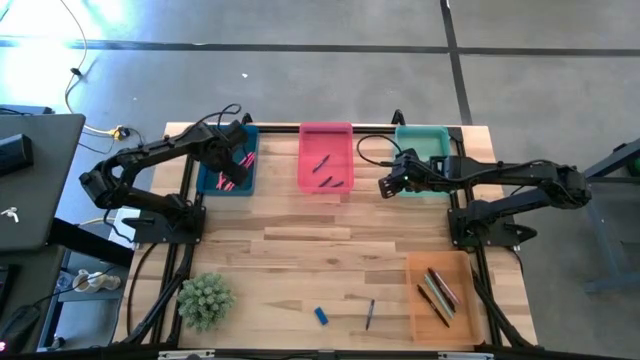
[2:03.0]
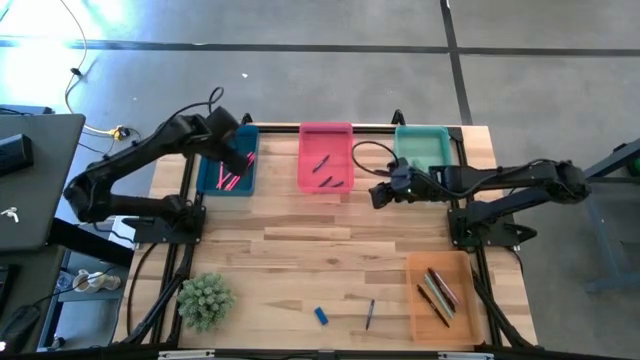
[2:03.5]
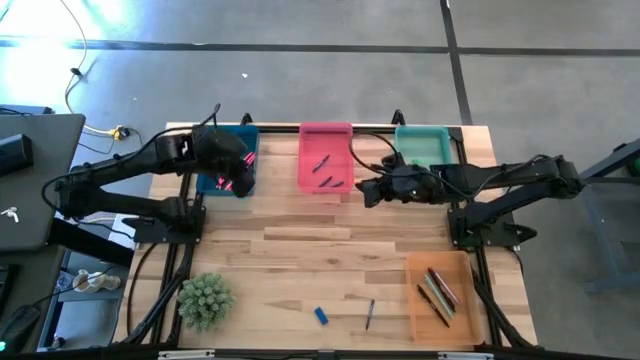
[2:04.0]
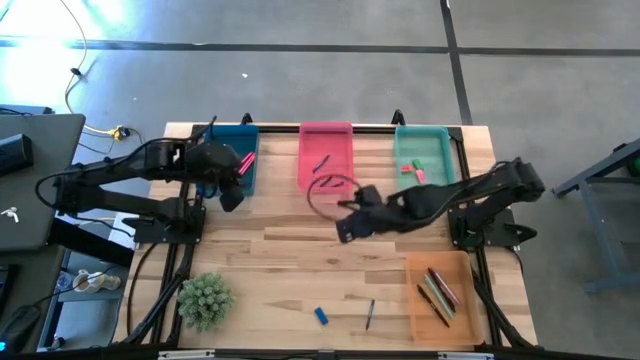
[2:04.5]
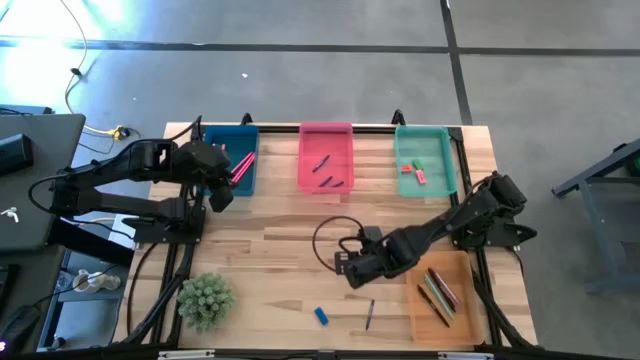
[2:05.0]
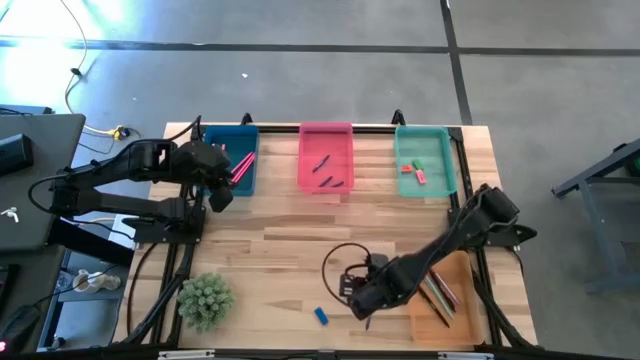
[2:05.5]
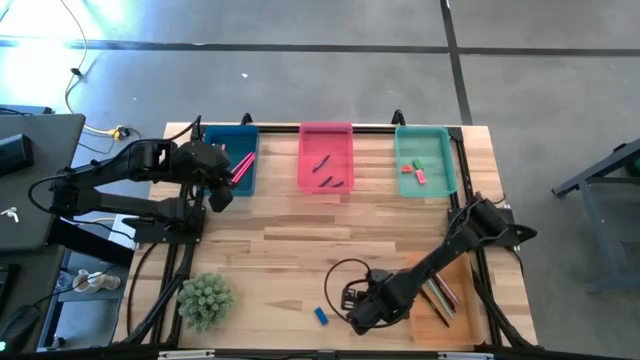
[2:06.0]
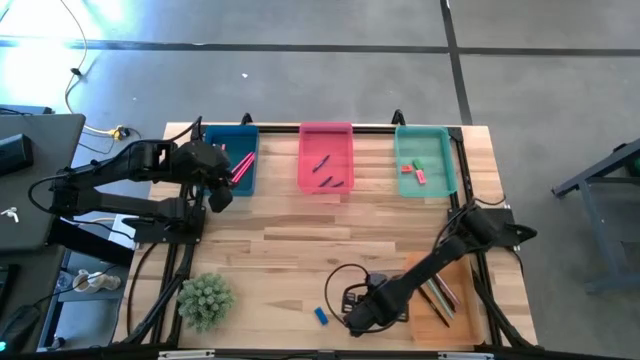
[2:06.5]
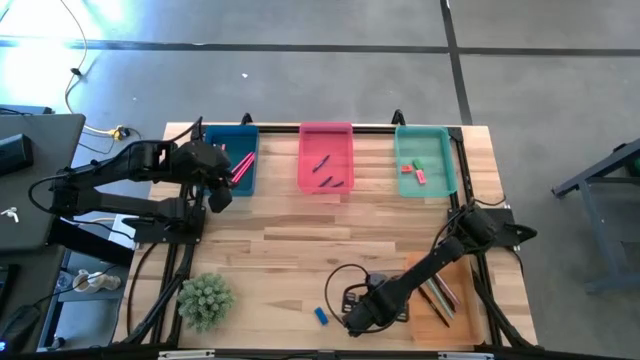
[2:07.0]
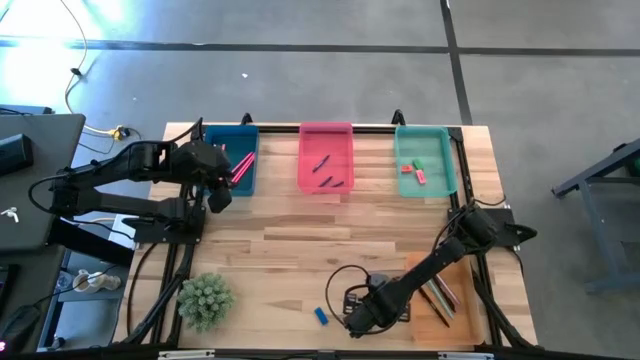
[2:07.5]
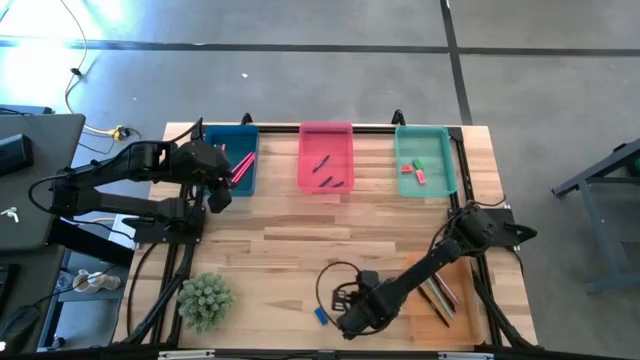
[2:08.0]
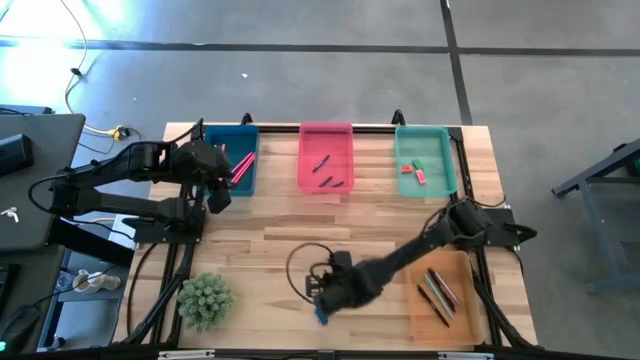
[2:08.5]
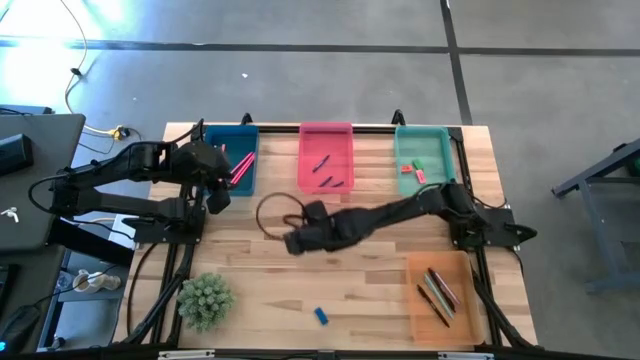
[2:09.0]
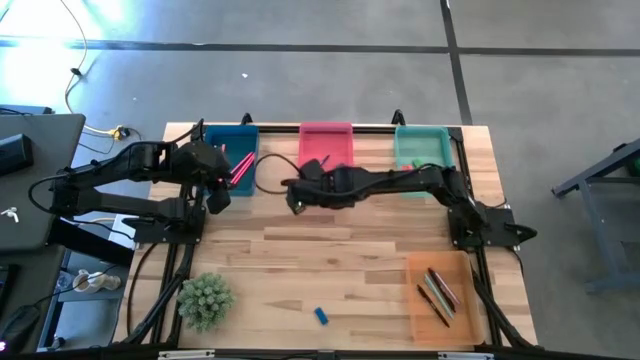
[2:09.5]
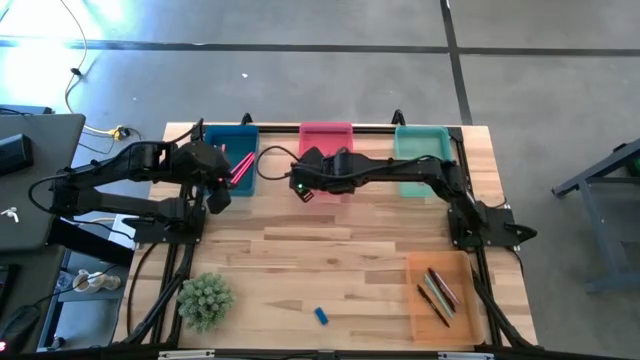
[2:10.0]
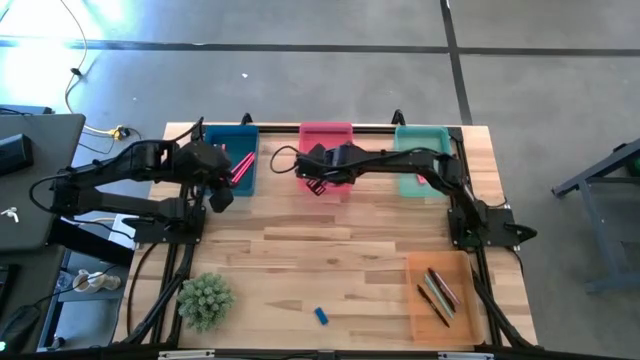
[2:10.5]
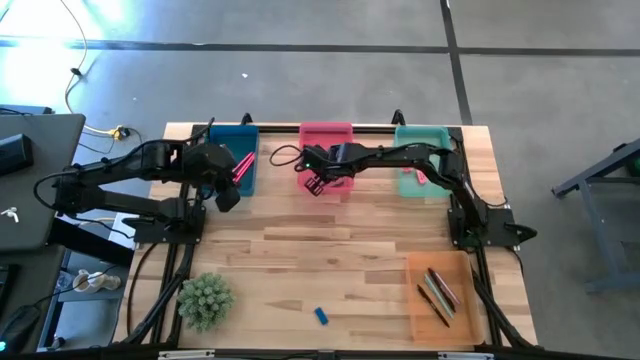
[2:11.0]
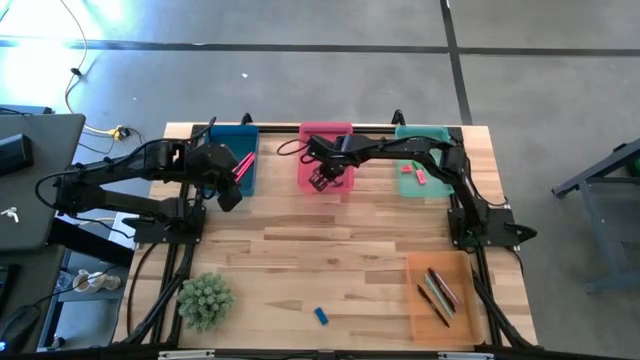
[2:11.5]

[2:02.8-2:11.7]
Task: Sort crayons/erasers/pens/pencils in bins
Put the blue crayon into the red bin

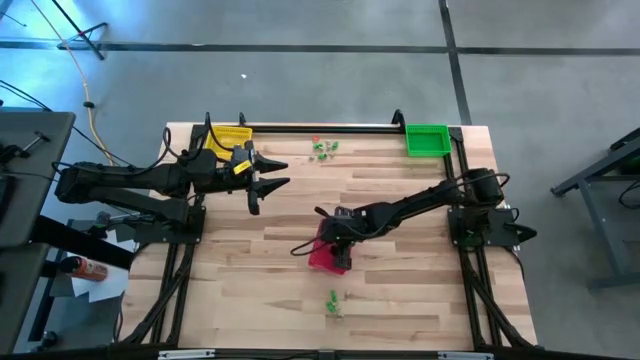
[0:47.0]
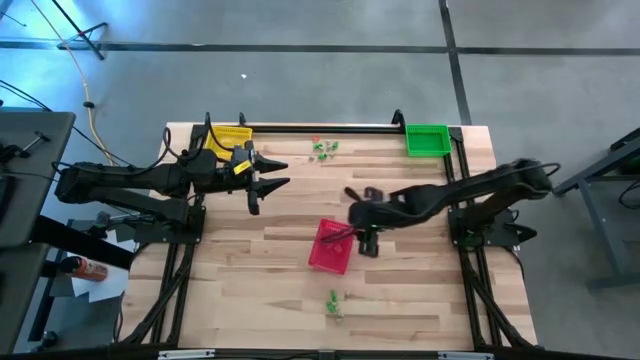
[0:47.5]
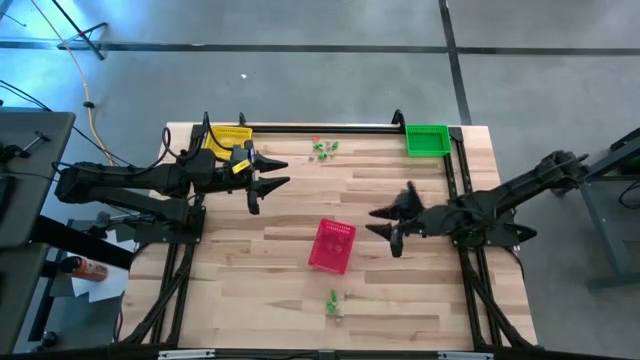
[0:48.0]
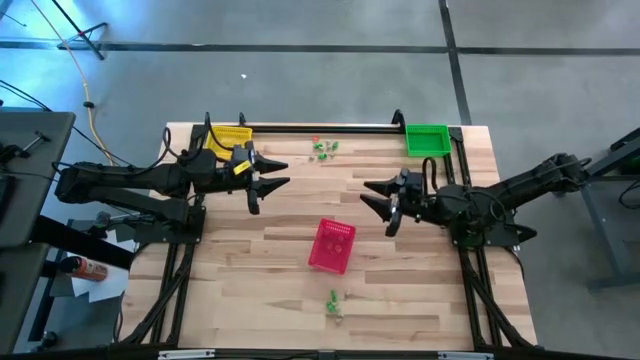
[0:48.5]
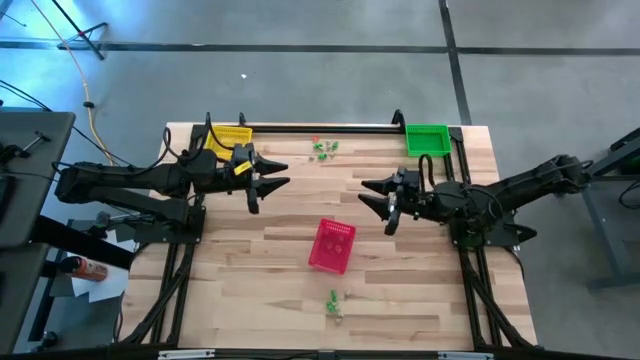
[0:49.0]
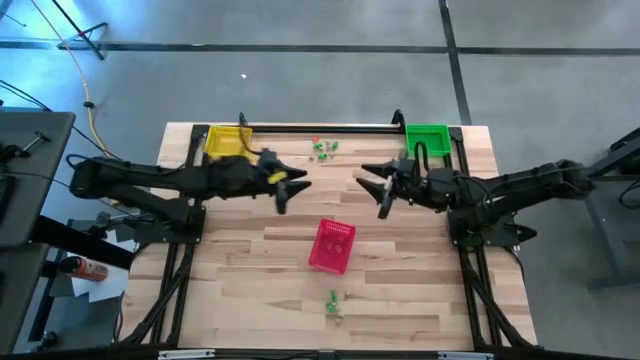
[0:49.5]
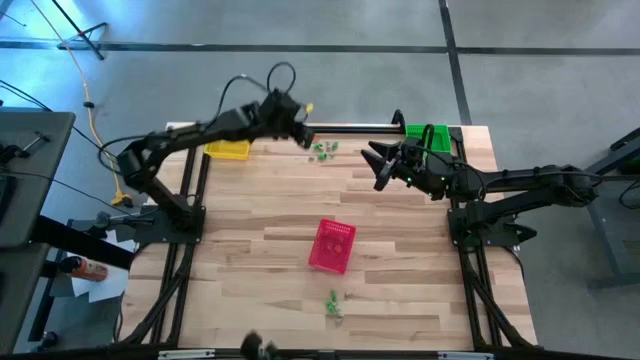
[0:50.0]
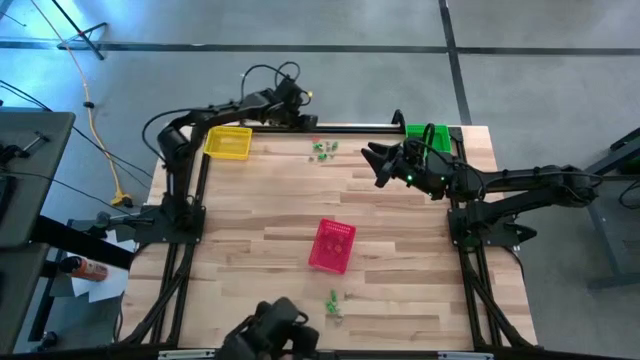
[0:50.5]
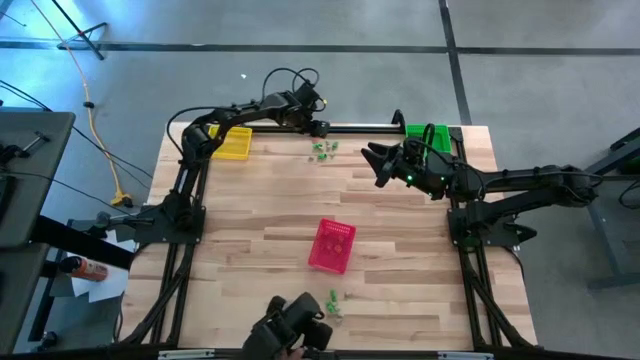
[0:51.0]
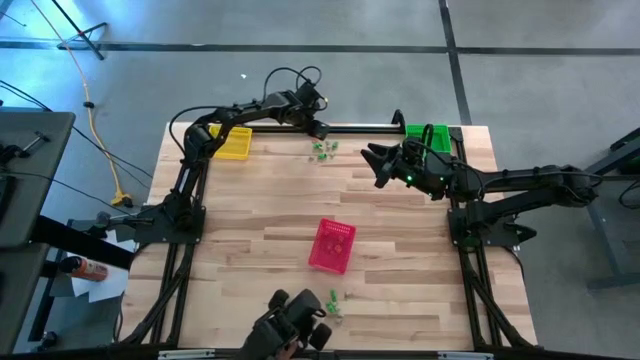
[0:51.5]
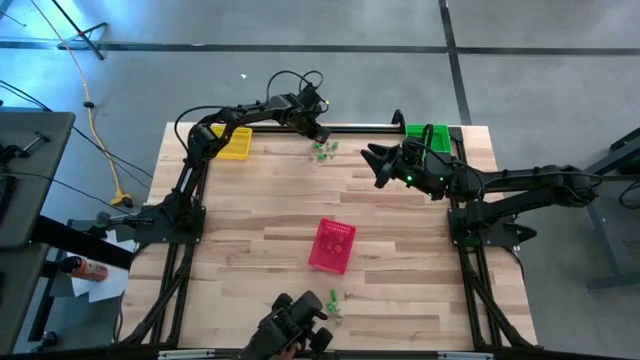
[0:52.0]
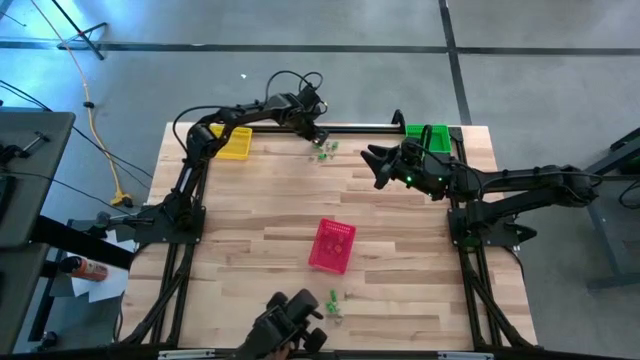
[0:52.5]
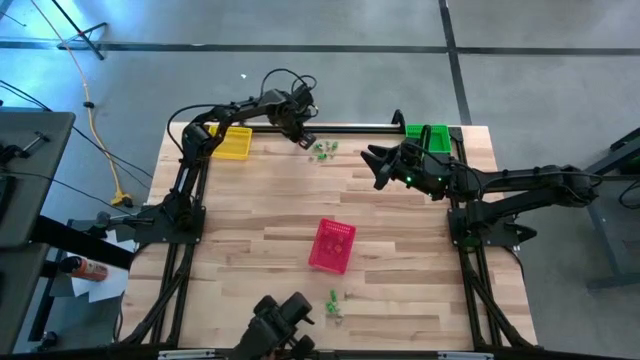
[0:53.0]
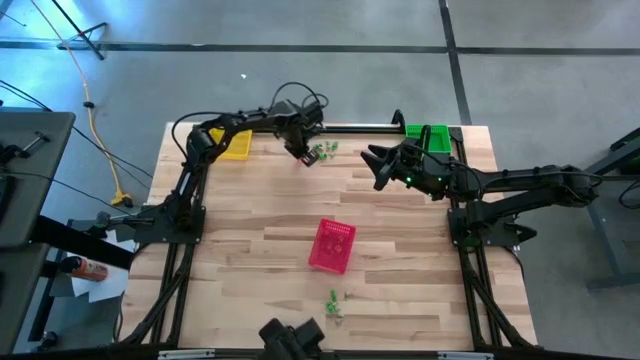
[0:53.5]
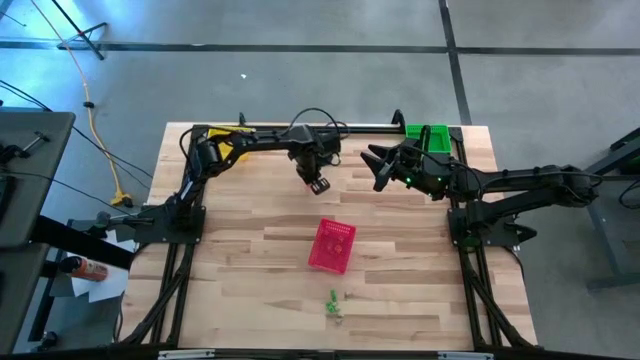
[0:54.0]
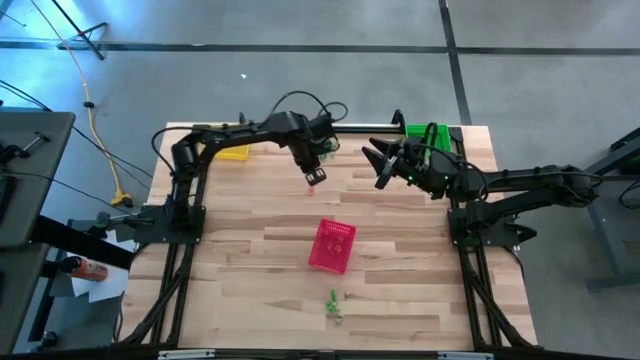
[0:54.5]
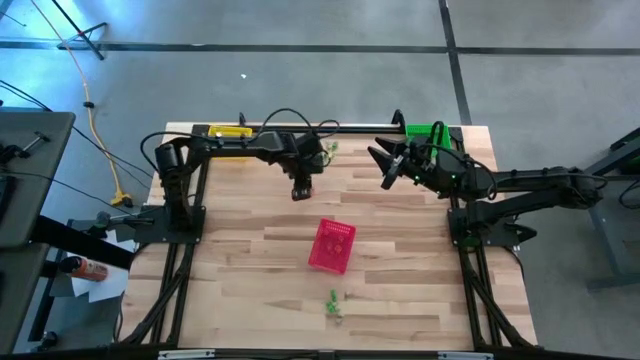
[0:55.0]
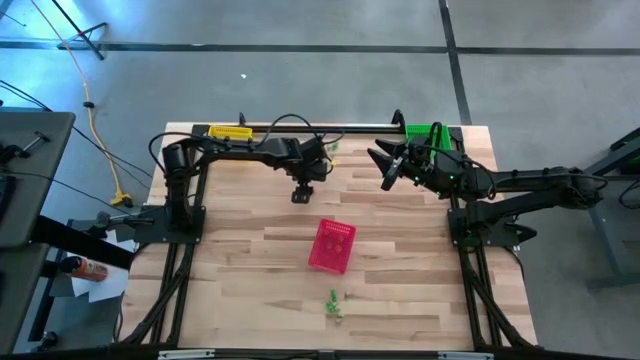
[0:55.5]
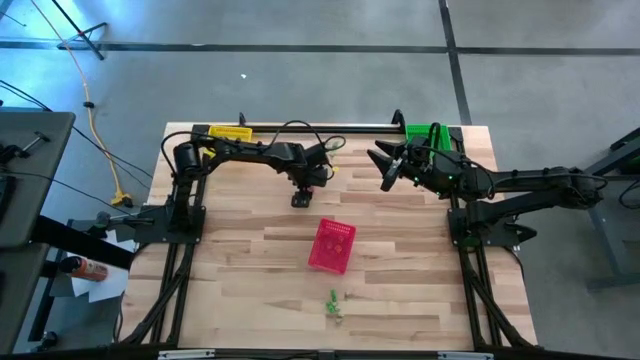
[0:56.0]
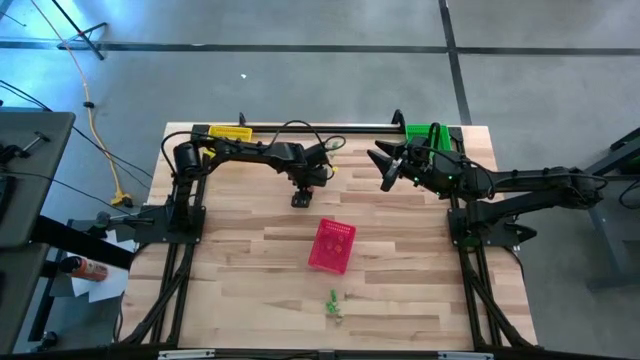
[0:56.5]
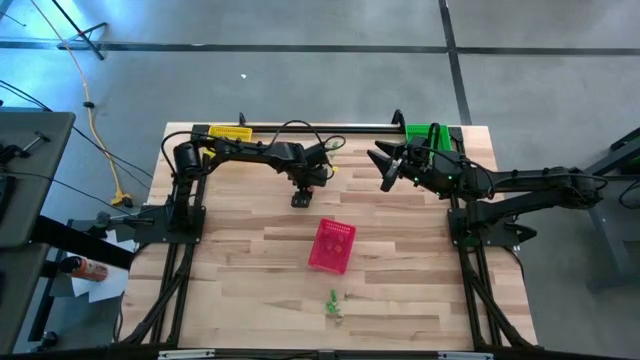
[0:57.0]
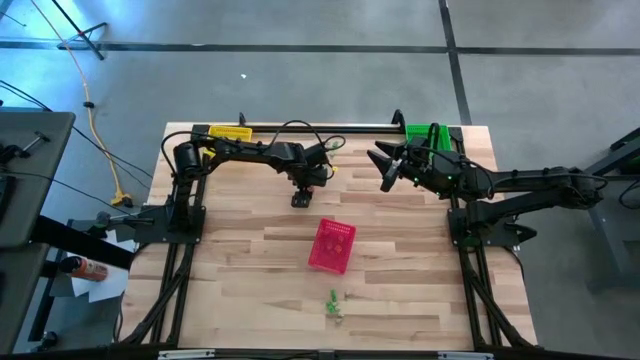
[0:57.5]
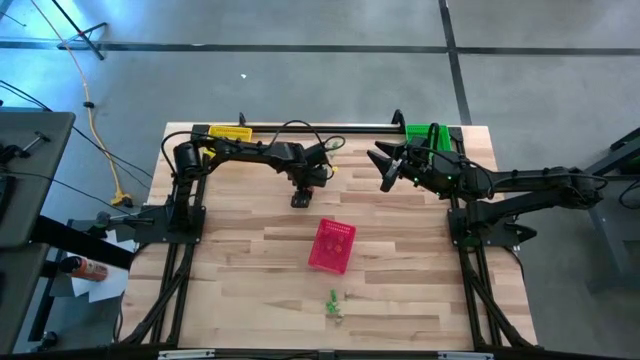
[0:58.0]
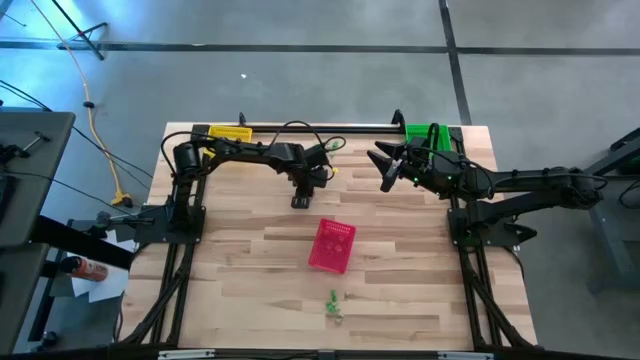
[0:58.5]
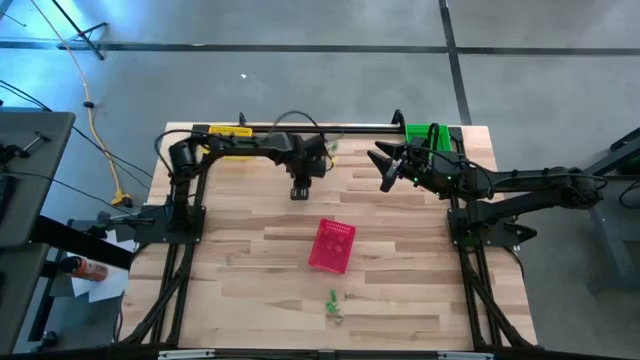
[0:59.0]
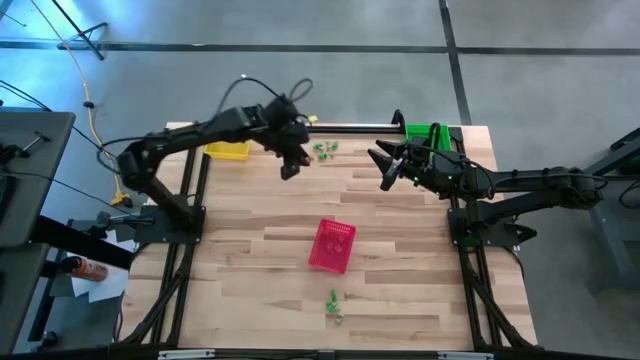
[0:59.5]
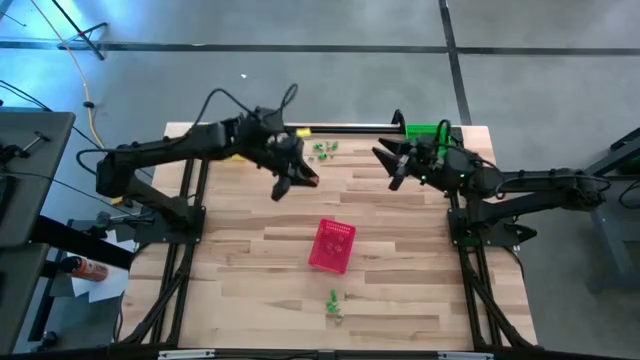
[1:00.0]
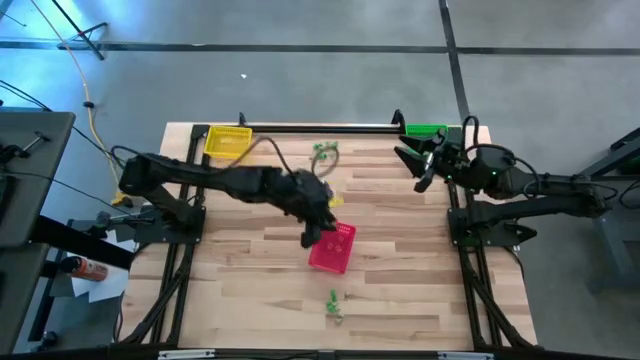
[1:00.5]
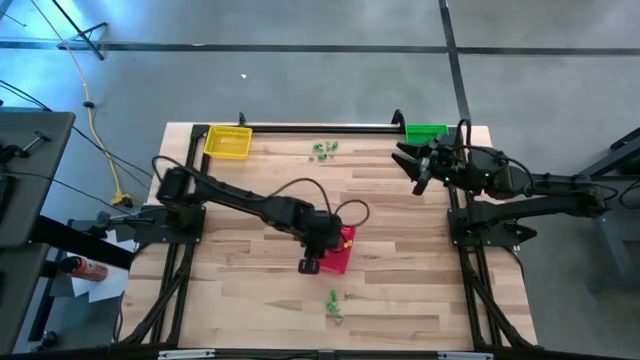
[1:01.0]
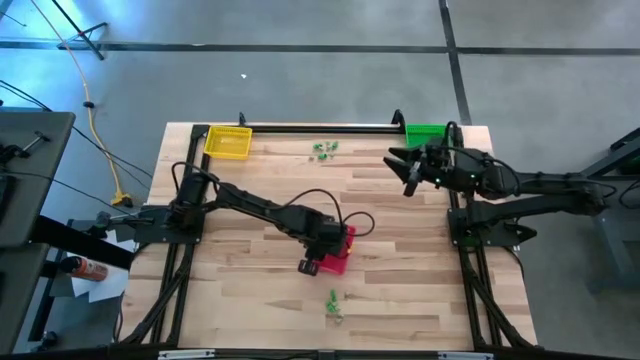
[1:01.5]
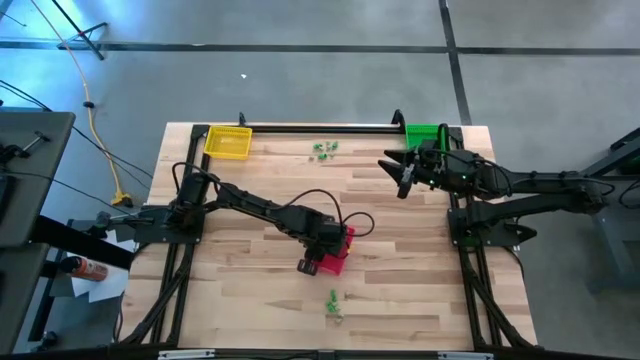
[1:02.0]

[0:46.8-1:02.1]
Task: Sort Halloween decoration
Put the orange pumpkin toy into the red bin
